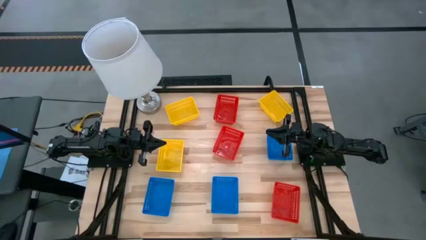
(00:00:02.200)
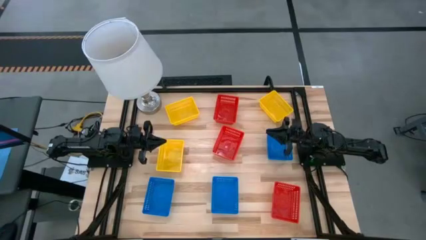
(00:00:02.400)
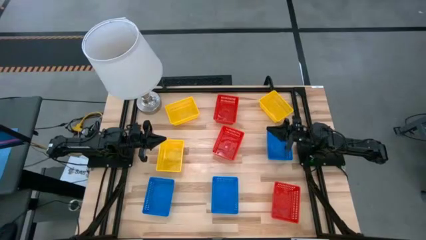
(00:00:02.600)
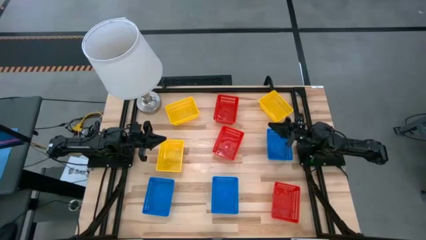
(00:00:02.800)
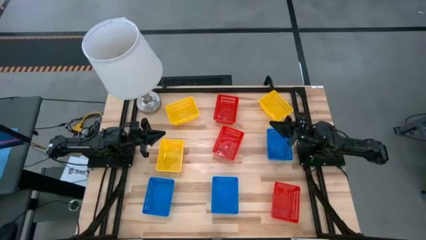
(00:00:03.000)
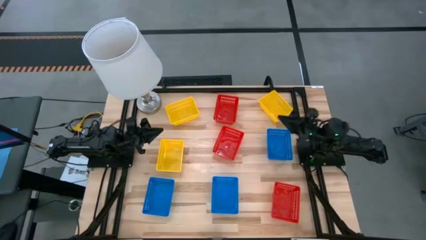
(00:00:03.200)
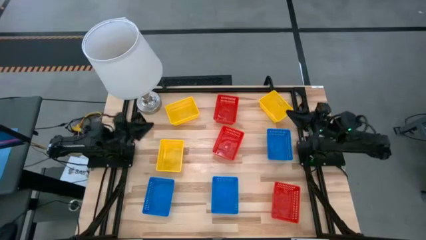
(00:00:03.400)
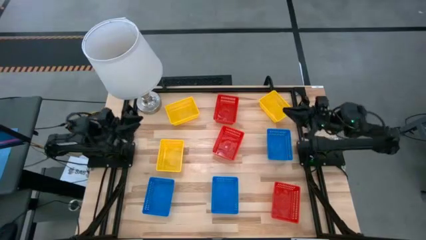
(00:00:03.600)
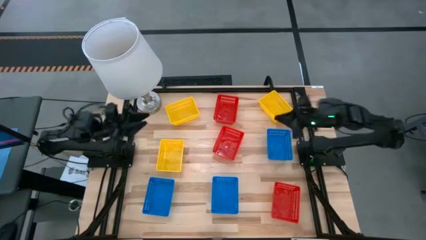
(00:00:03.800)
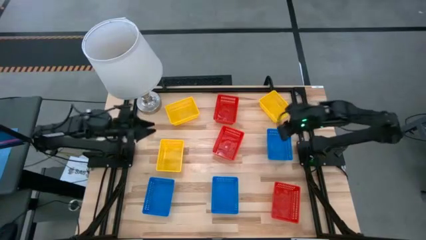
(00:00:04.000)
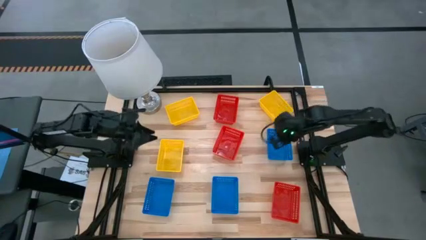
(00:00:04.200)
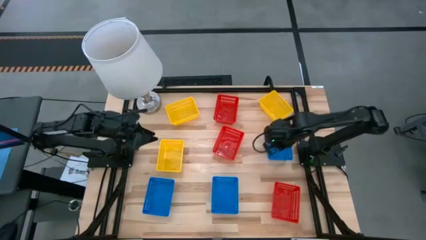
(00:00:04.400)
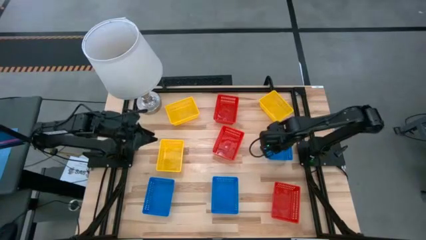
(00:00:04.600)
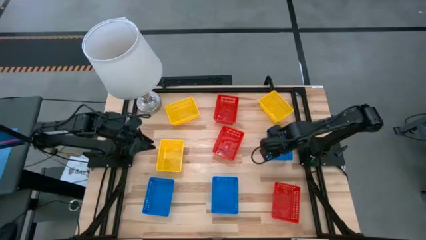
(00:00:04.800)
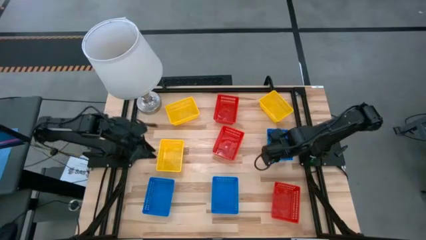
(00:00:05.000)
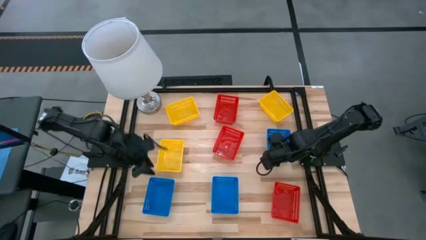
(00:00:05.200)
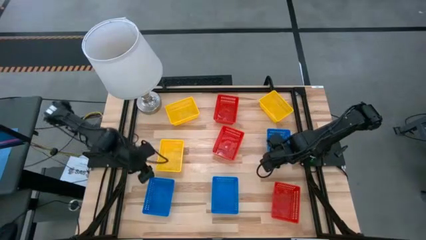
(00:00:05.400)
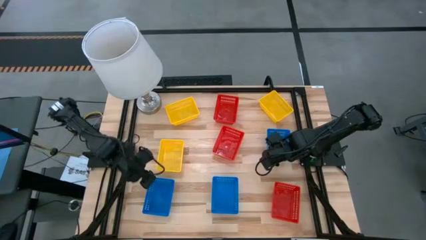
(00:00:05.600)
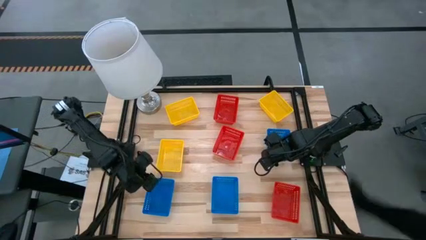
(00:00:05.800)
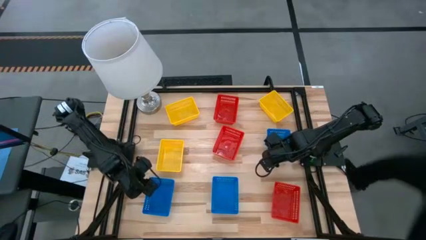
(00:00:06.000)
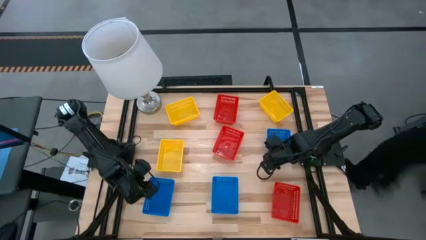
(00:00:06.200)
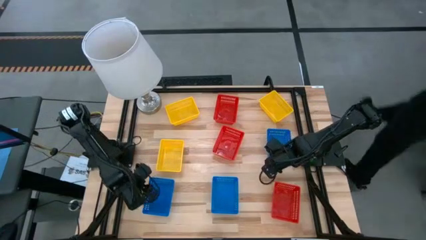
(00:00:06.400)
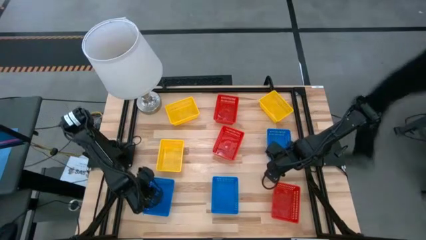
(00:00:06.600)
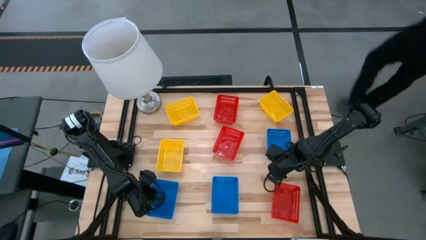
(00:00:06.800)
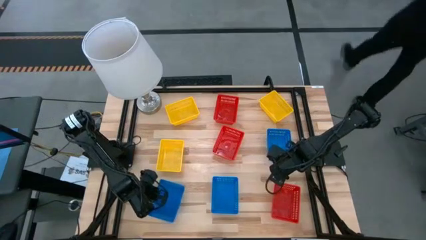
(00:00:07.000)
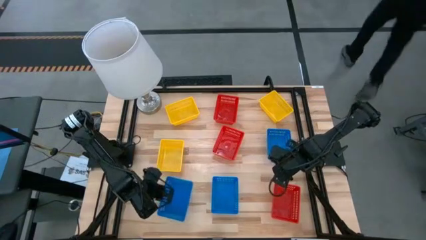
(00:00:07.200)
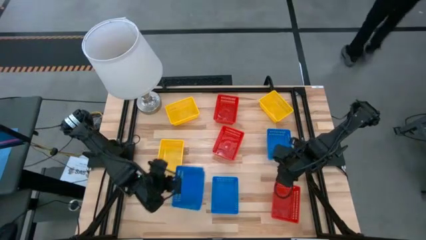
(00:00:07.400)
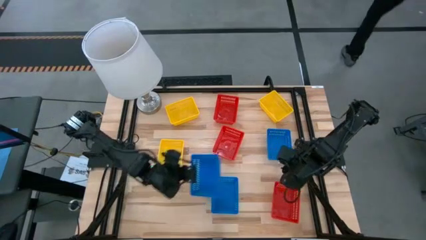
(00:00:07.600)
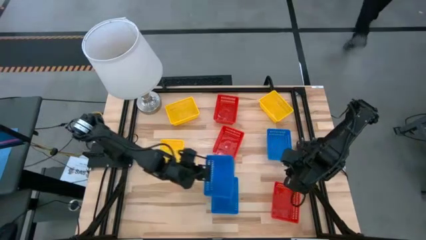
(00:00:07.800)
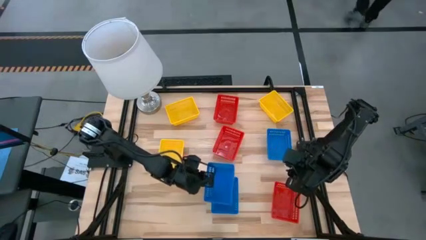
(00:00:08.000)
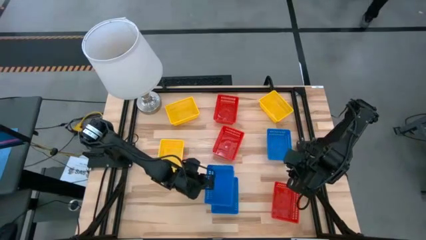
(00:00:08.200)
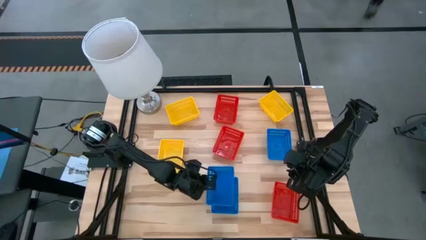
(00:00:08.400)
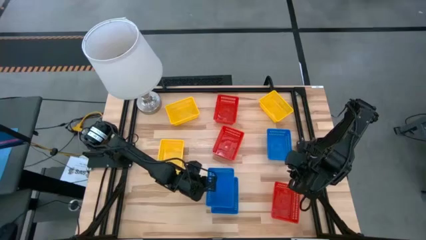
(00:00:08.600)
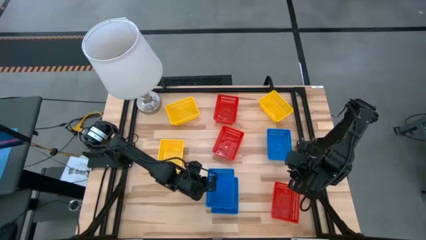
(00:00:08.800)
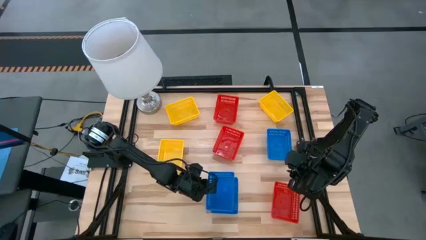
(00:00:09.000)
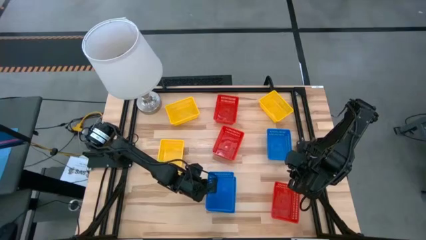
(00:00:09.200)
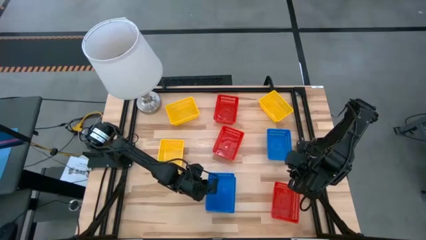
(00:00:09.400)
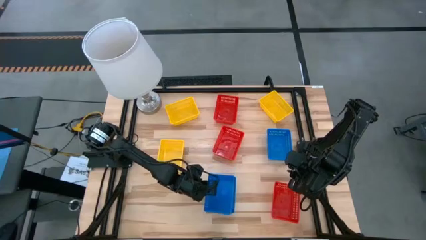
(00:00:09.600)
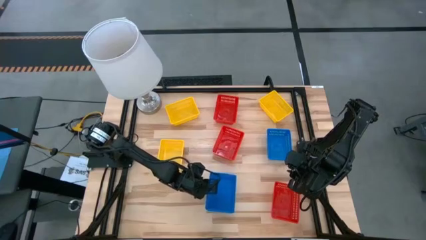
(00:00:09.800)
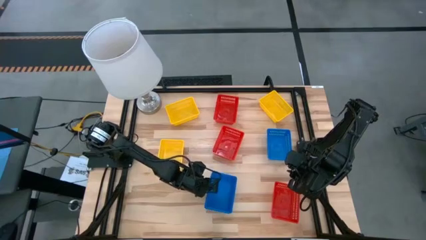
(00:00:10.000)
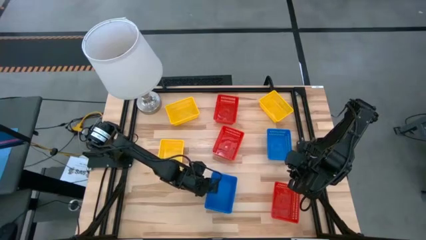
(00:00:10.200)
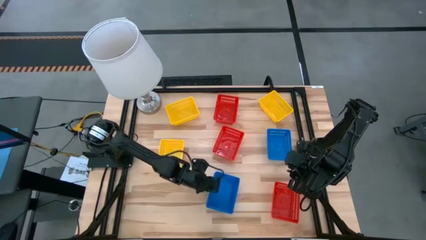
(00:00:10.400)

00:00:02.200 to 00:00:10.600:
Stack the left blue basket on top of the middle blue basket

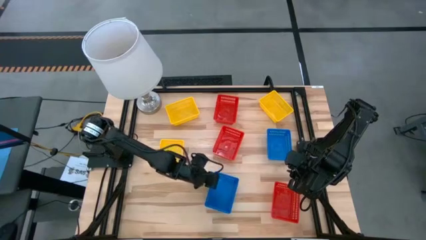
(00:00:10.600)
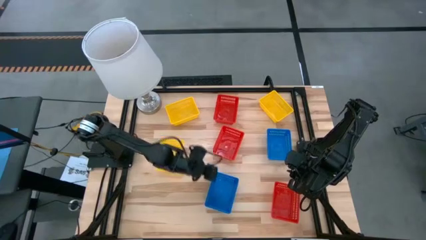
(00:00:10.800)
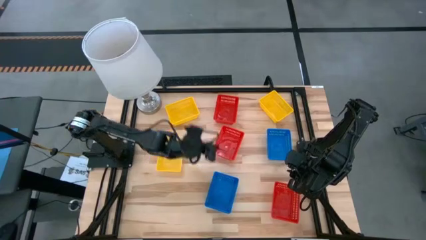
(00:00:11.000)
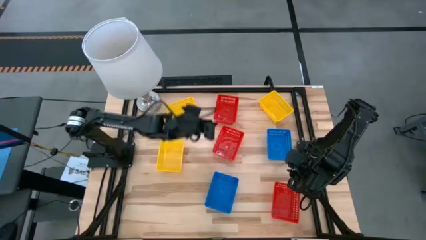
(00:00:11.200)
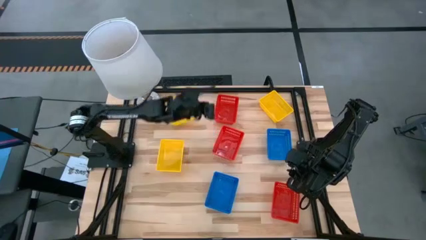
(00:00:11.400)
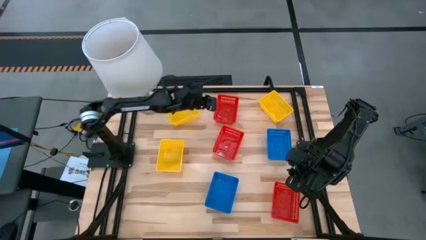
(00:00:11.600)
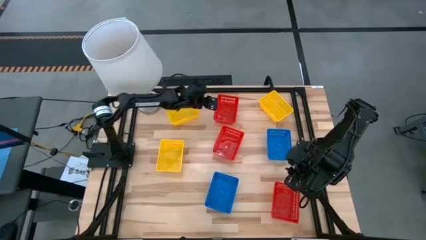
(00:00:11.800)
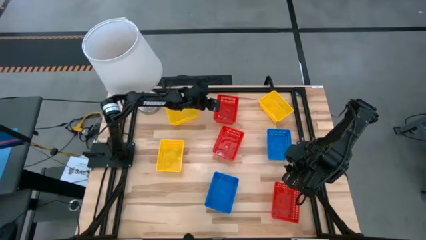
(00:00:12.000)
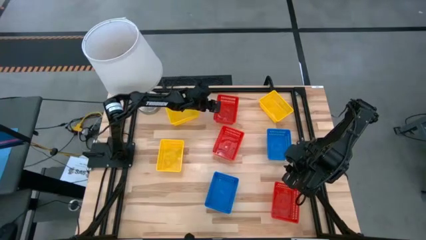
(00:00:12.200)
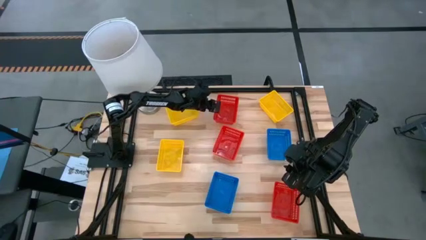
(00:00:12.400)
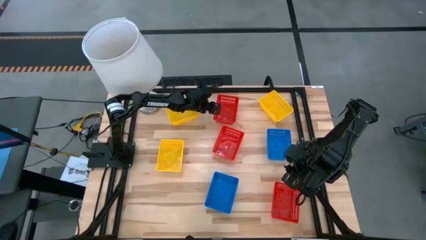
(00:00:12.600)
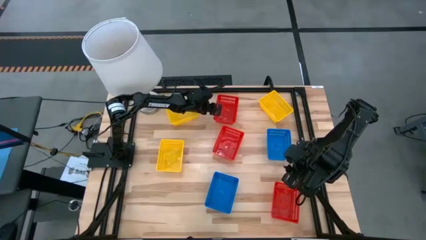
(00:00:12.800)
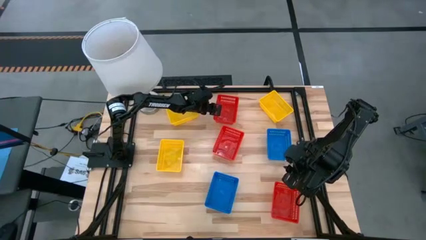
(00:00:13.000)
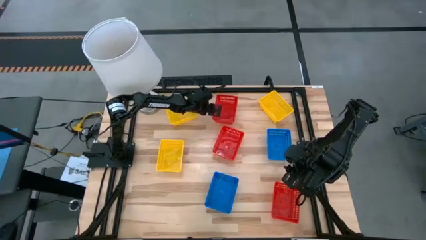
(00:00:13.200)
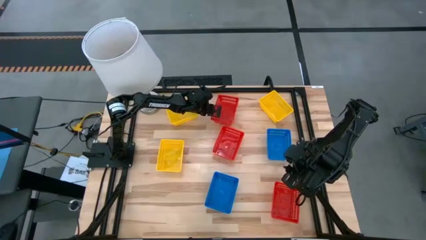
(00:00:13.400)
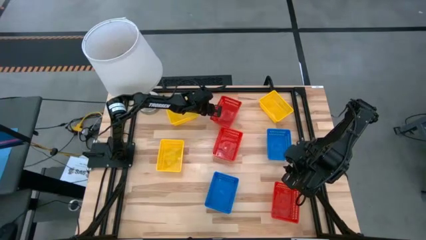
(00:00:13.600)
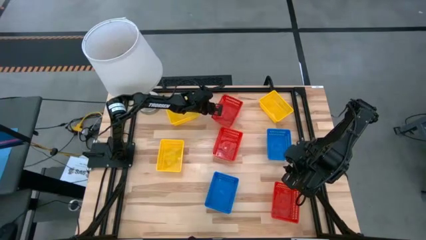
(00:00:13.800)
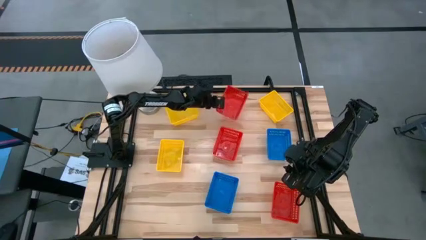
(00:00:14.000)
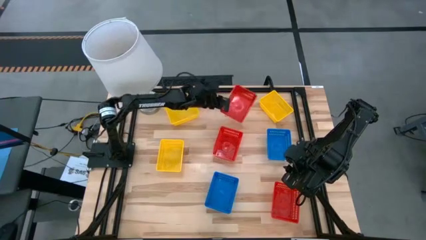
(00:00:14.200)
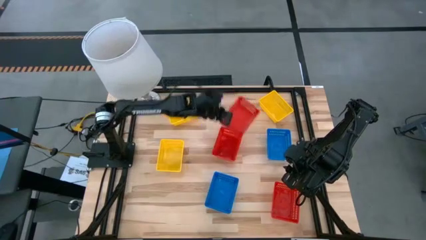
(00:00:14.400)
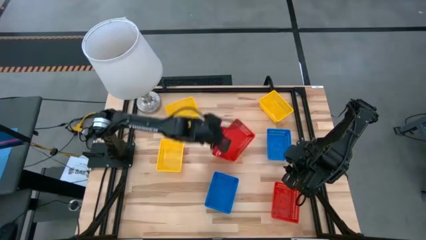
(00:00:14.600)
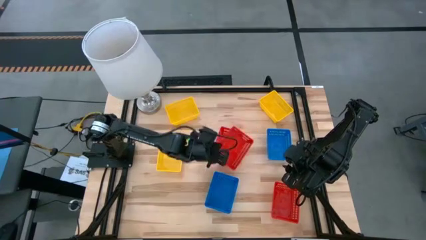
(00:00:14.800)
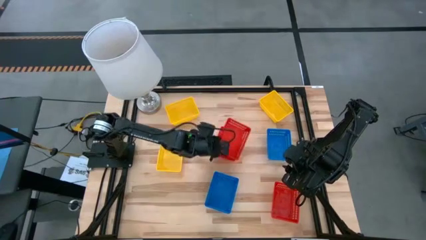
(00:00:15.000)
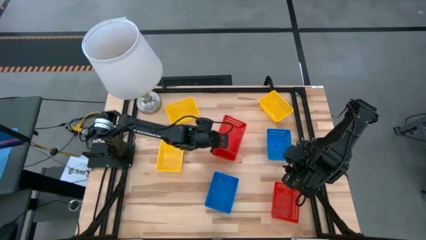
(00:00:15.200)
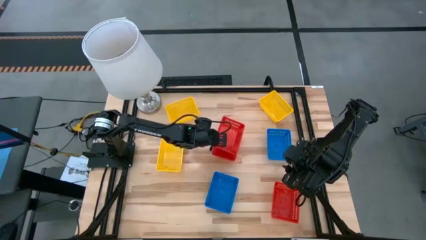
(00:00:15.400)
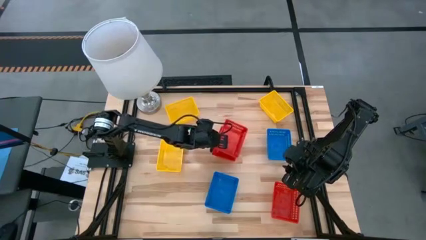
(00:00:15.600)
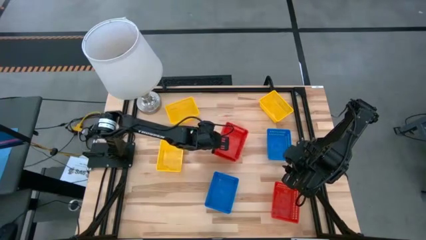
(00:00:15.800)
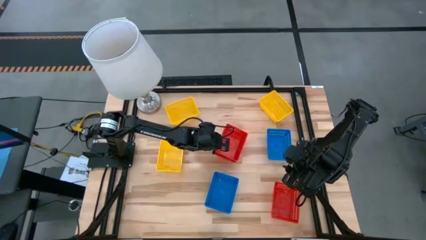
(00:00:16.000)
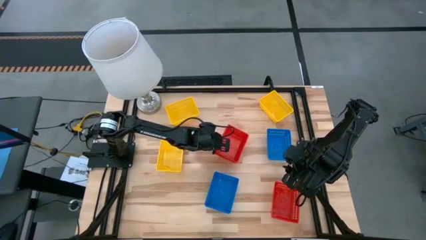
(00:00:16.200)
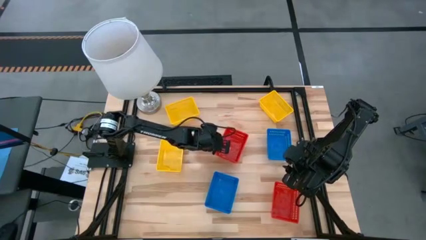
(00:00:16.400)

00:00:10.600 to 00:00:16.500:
Stack the top red basket on top of the middle red basket
